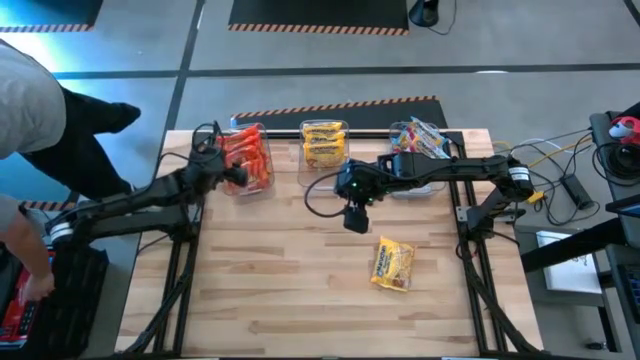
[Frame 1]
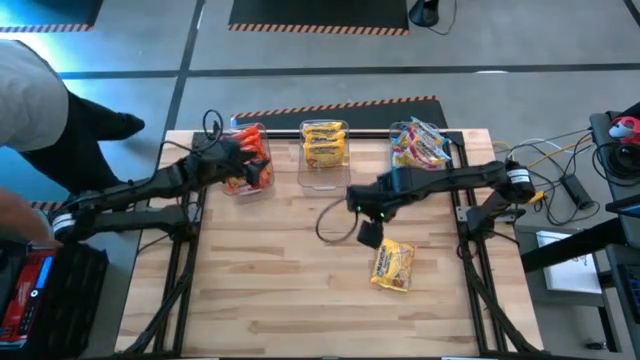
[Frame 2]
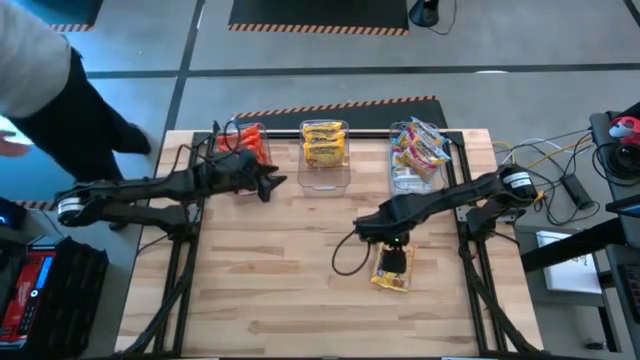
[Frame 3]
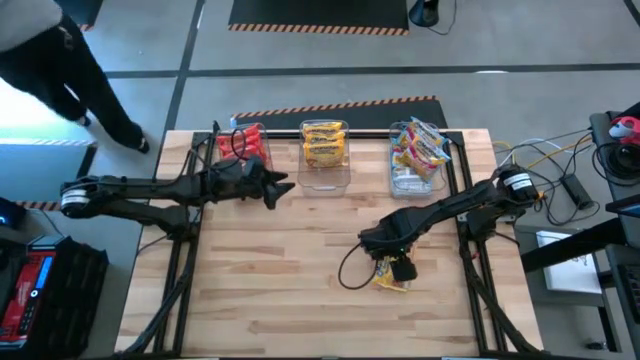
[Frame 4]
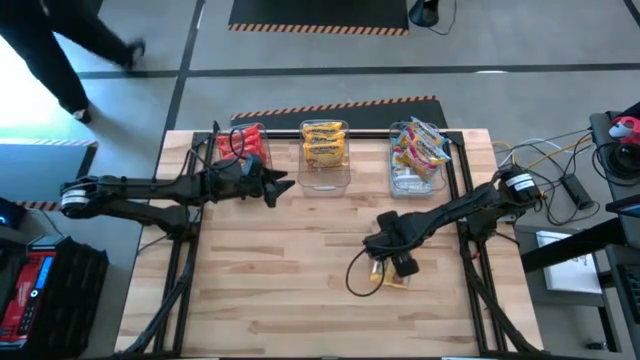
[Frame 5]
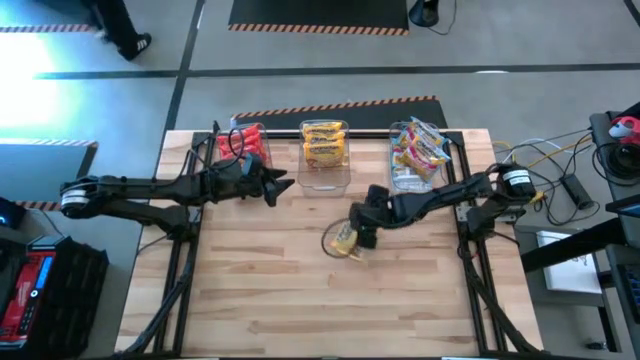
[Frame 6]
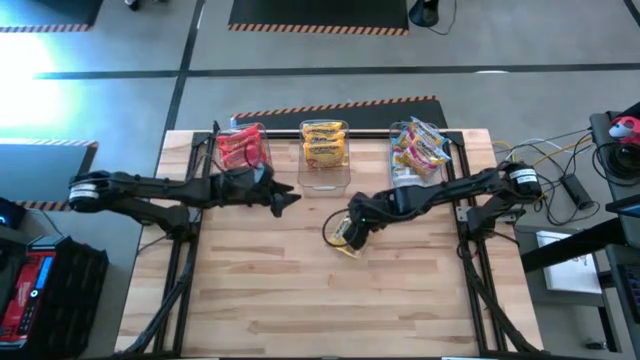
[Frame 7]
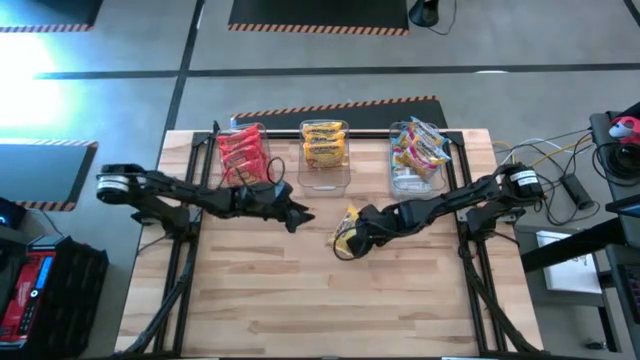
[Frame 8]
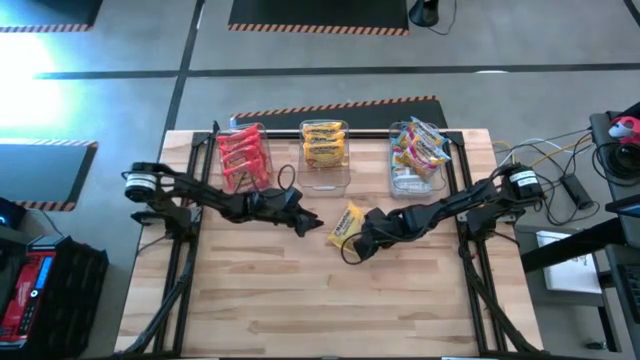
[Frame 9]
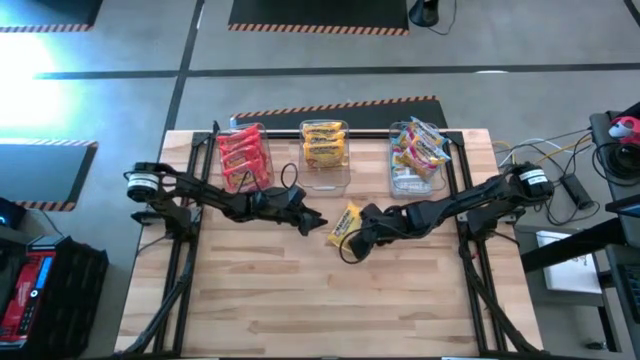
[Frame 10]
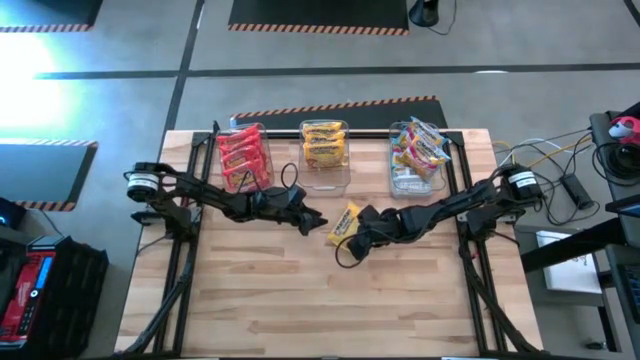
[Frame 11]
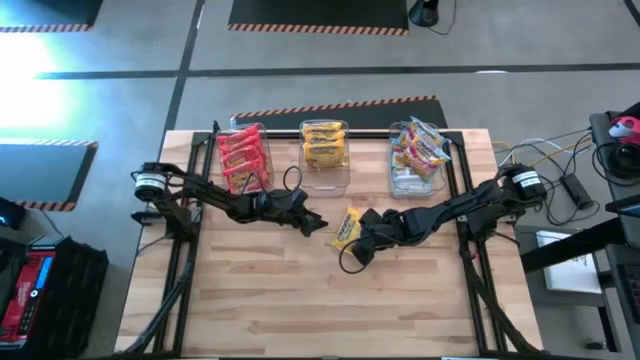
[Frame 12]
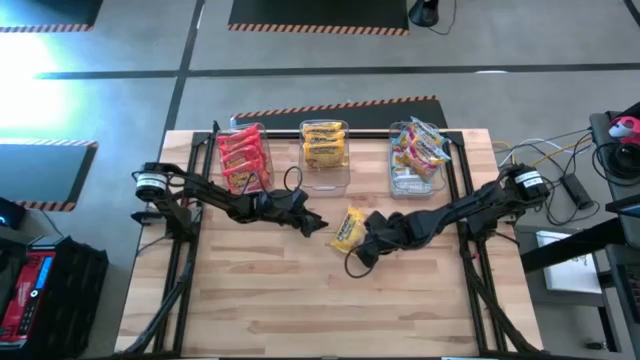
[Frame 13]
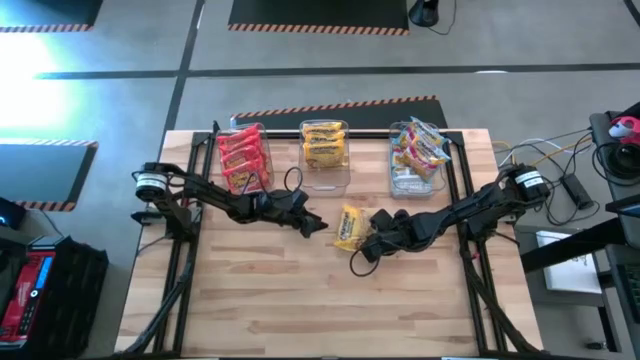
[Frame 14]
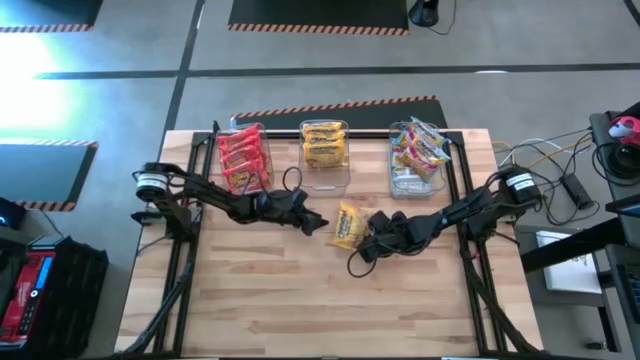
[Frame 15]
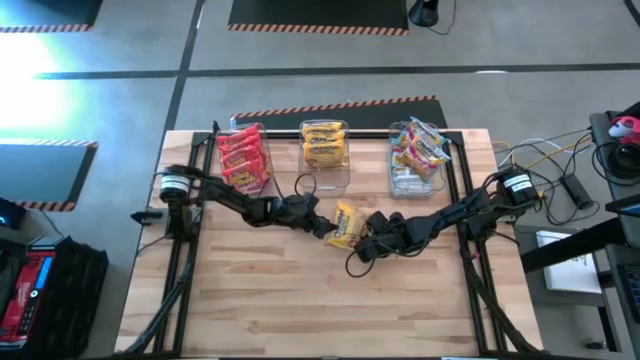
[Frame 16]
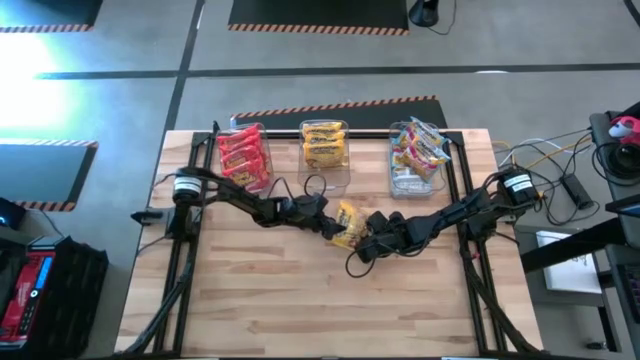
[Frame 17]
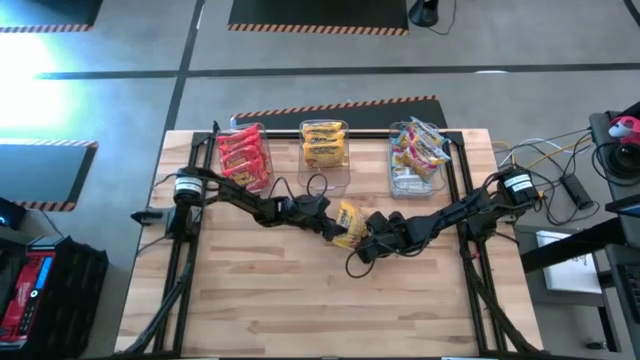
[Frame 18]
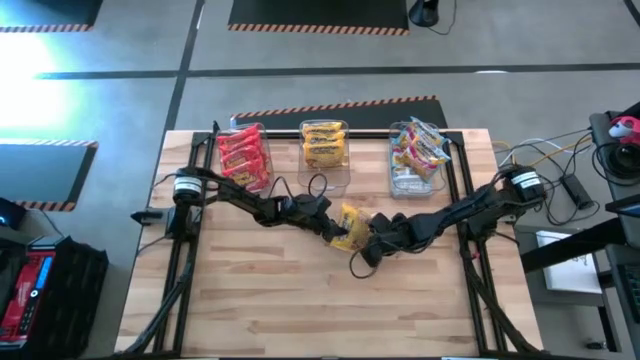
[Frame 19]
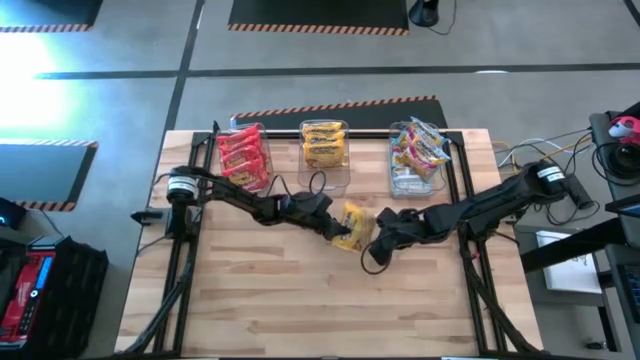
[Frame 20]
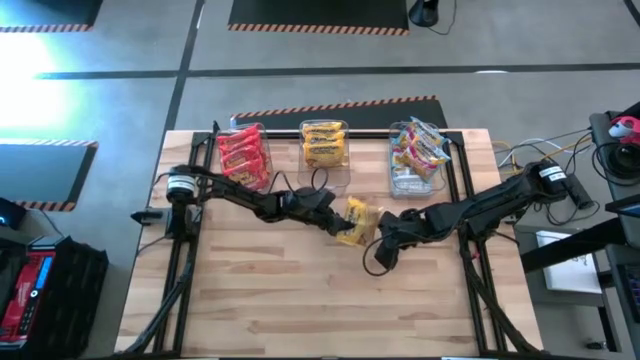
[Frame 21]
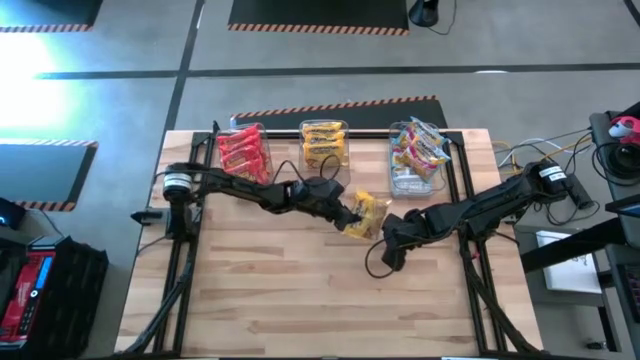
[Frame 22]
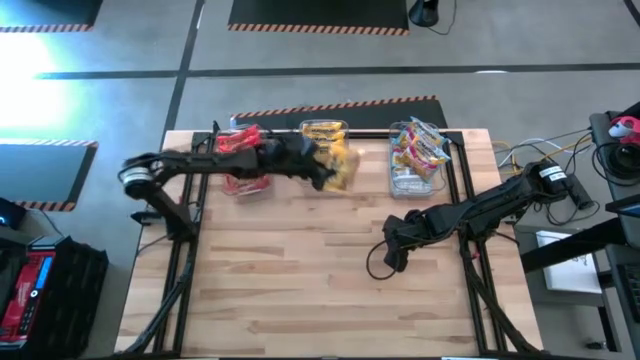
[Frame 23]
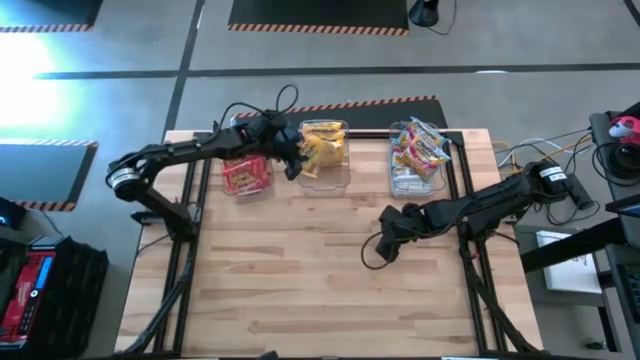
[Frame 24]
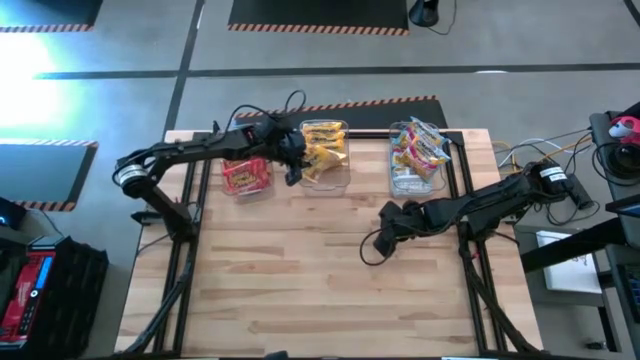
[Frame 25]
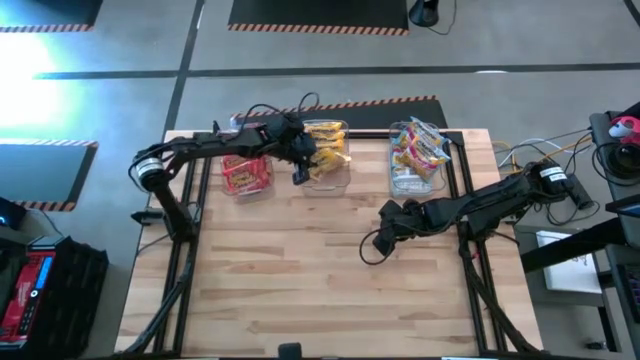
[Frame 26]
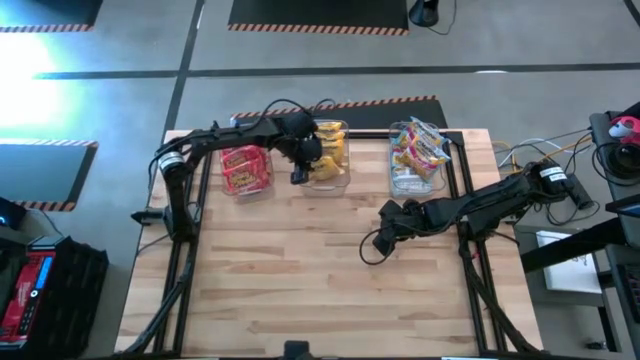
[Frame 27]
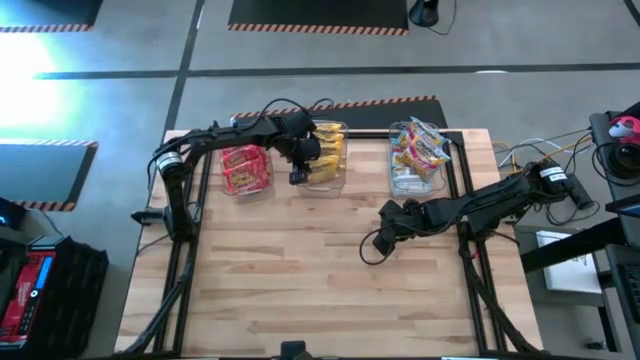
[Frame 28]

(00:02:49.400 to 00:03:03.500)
Task: Sort Maruchan noodles
Put the yellow noodle pack into the middle transparent bin

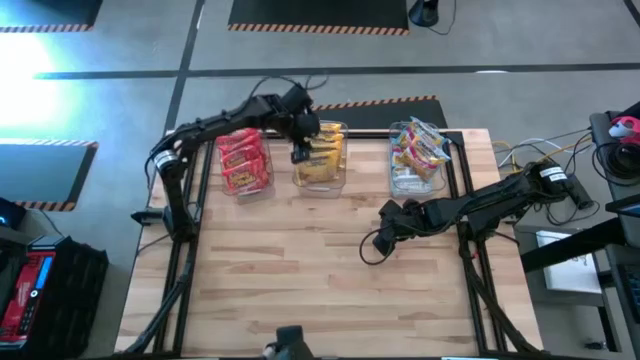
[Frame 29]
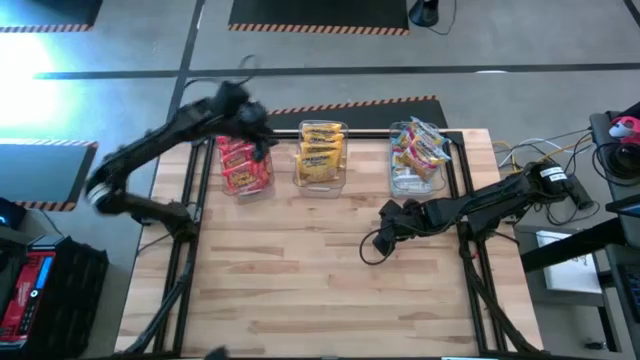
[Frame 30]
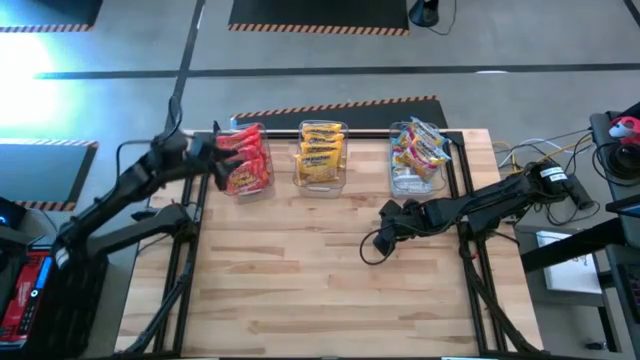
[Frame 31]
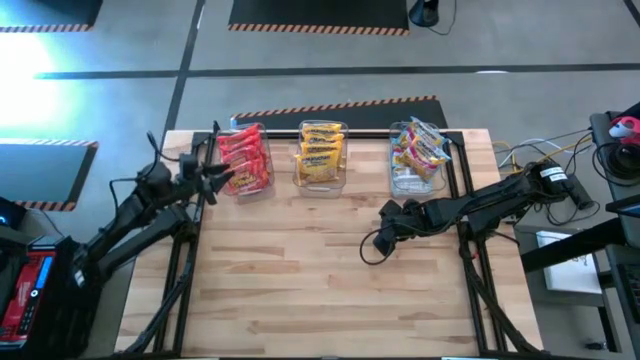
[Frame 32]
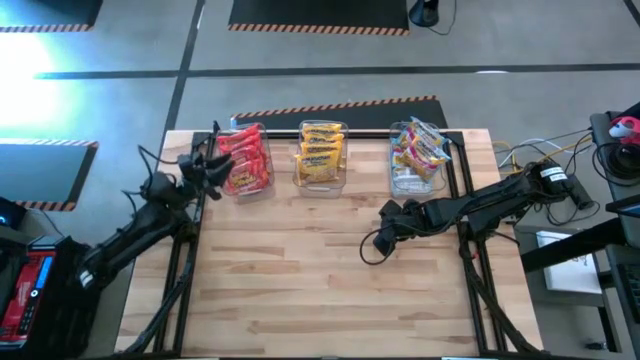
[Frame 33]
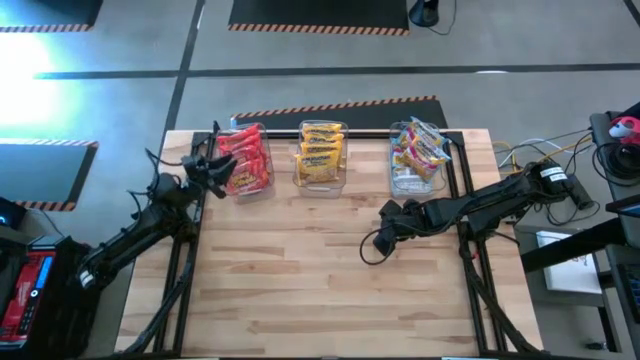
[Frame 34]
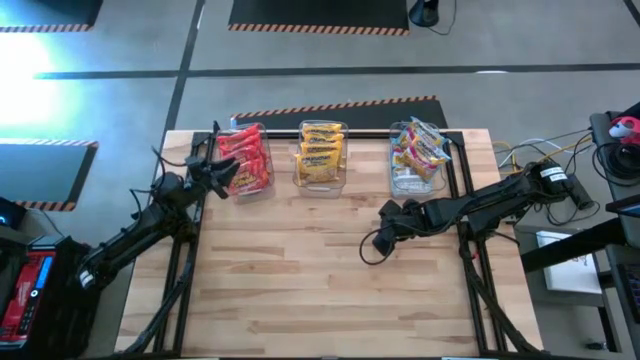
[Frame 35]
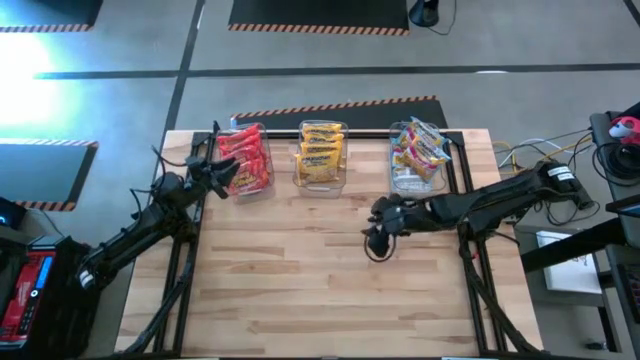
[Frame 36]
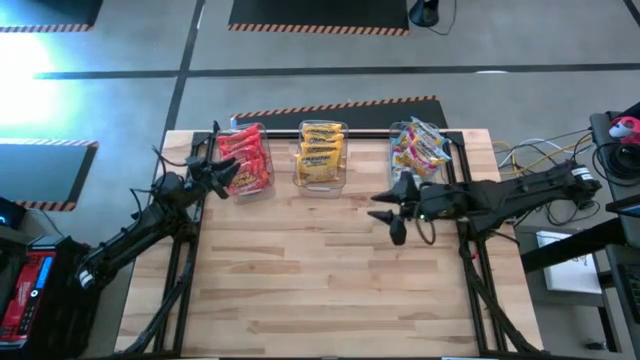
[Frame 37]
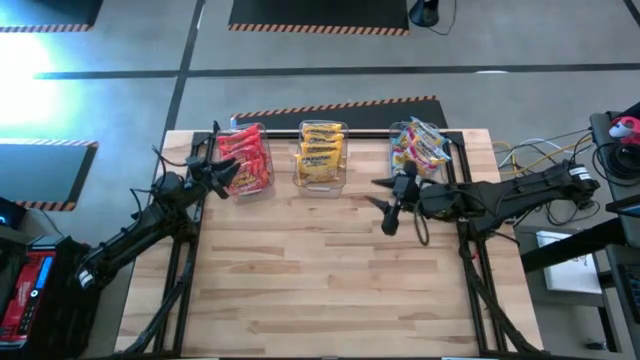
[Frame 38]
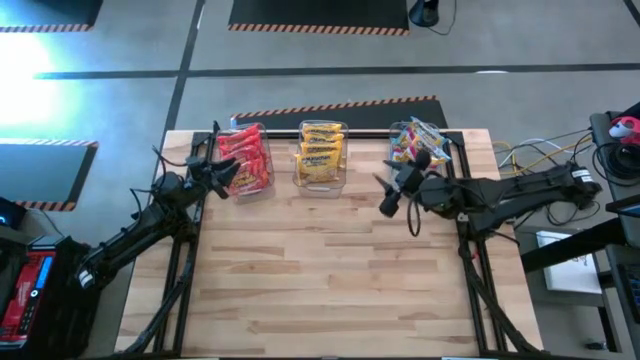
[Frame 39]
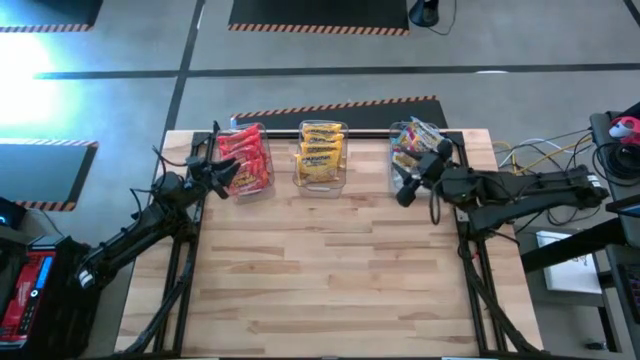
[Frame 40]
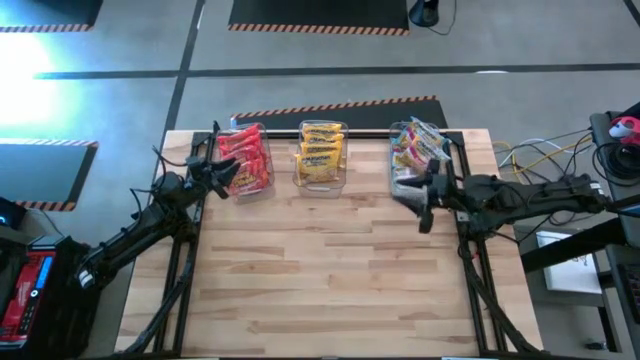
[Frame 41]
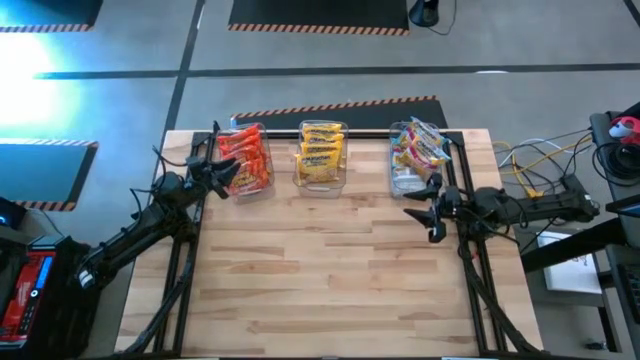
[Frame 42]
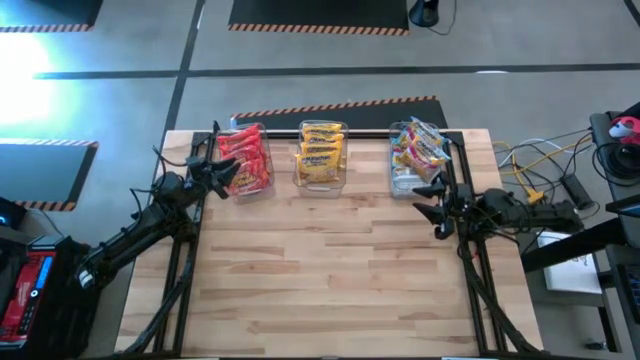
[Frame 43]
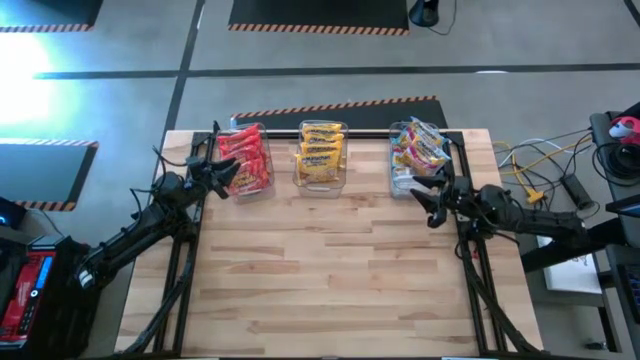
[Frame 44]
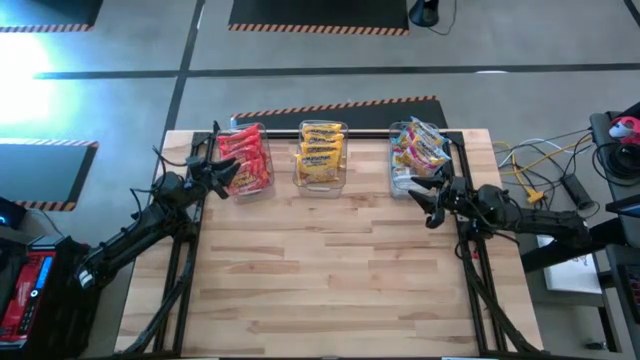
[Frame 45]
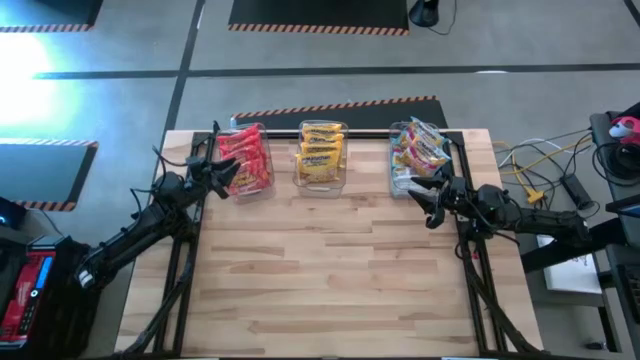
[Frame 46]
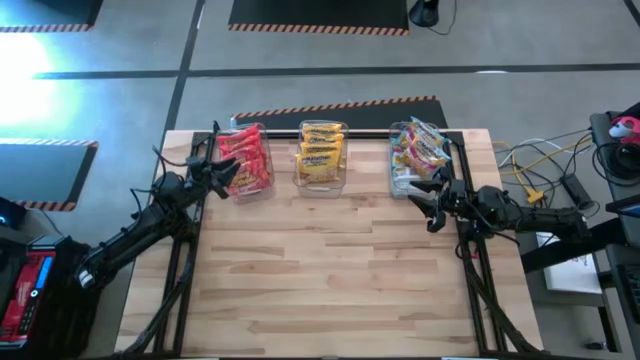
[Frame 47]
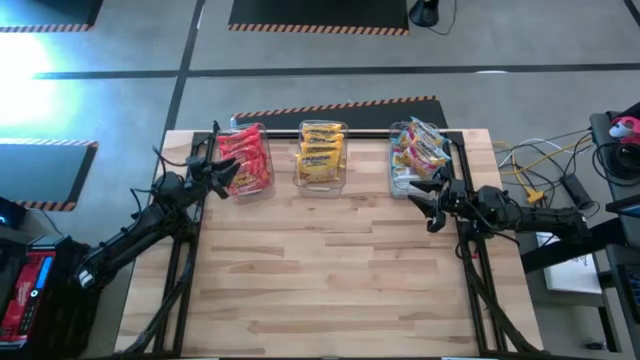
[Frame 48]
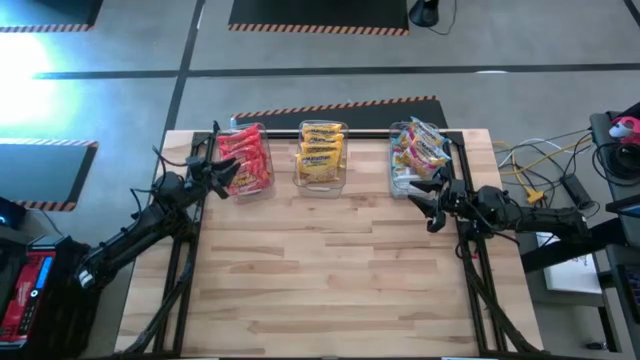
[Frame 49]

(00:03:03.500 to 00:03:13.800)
Return to Home Position
